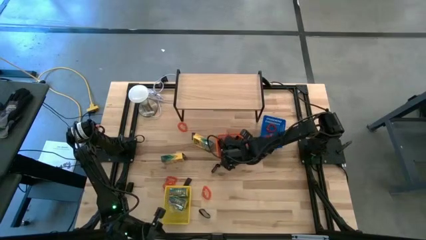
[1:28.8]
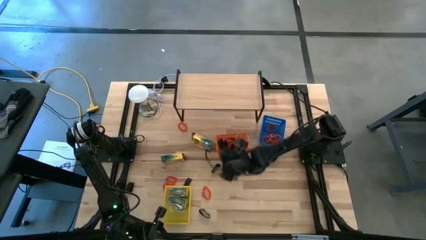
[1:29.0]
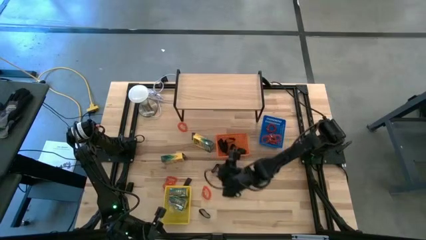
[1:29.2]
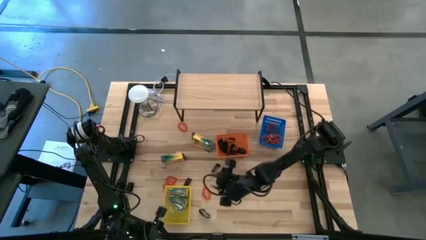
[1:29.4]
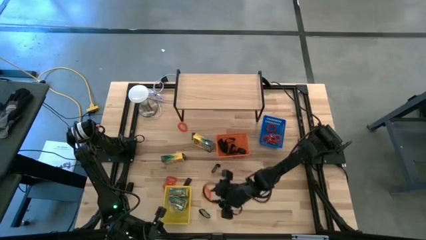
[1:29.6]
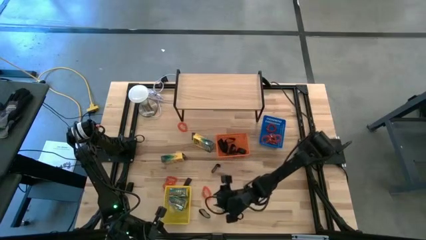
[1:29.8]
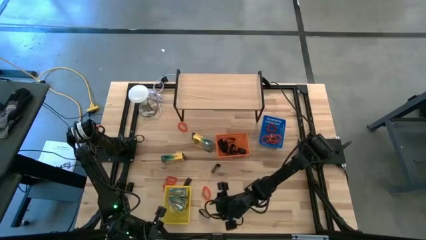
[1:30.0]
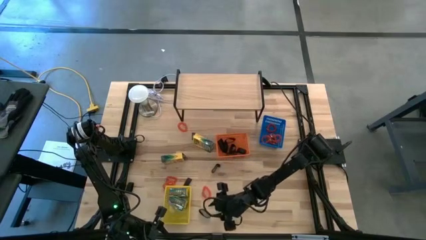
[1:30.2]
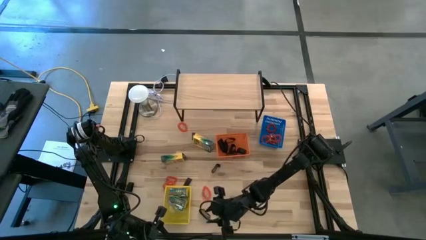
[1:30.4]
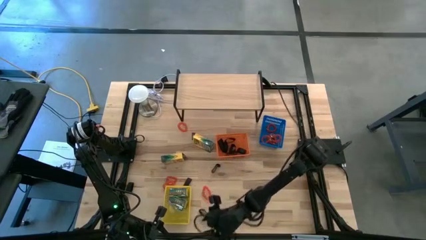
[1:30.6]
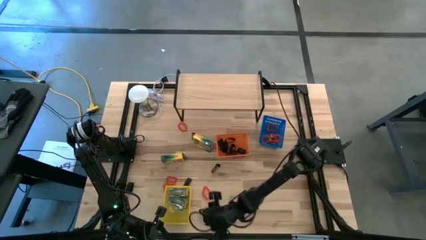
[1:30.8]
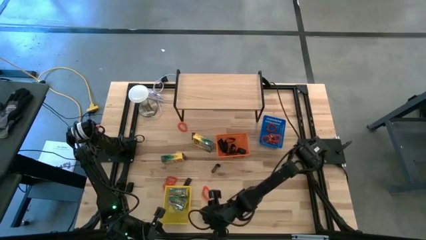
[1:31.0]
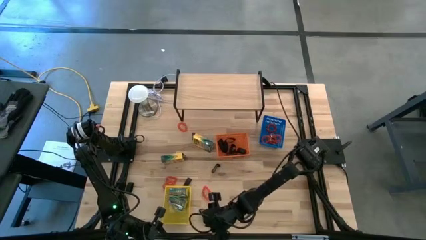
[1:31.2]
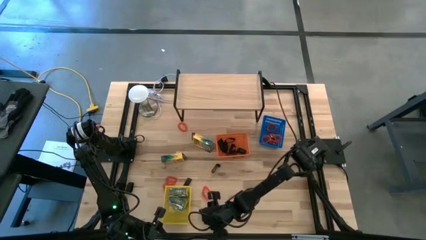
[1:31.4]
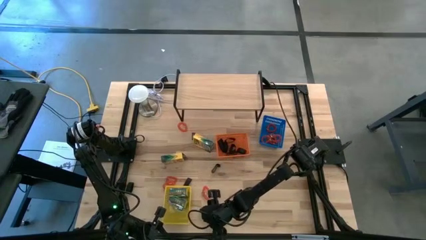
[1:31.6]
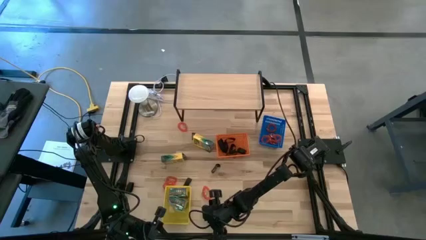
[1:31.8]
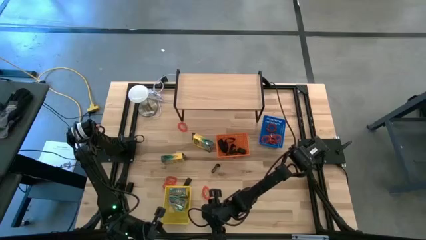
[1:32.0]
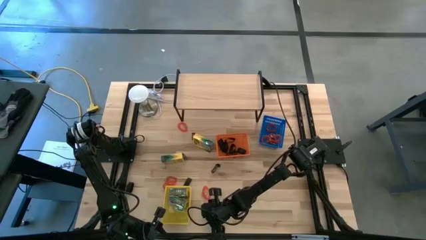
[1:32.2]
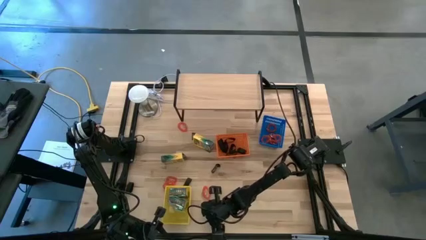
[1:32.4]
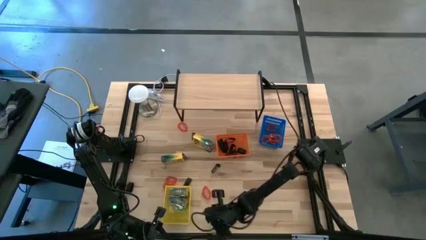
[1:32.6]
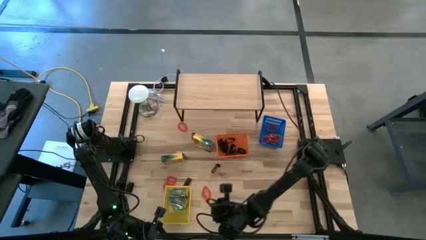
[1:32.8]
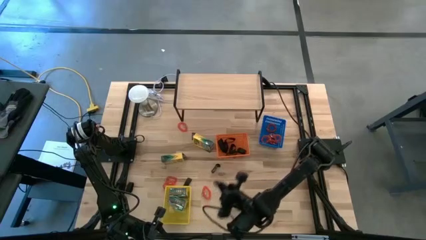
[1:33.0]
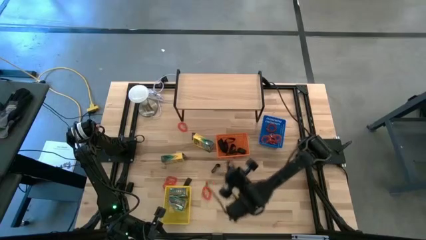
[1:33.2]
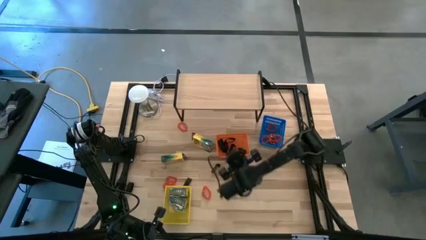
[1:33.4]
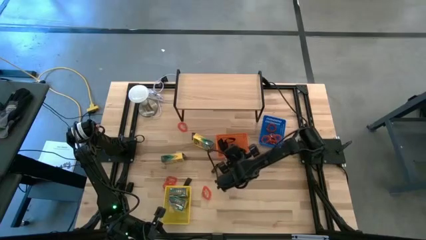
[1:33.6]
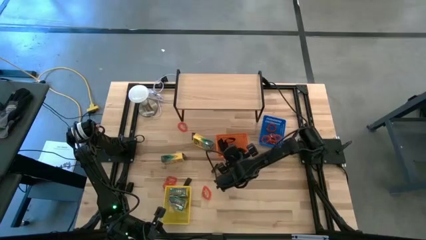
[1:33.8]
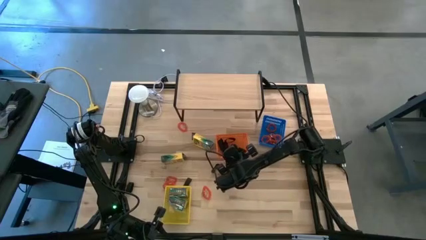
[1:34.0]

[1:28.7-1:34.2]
Task: Pick & Place Office Desk Supplies
Put the rubberband into the orange bin

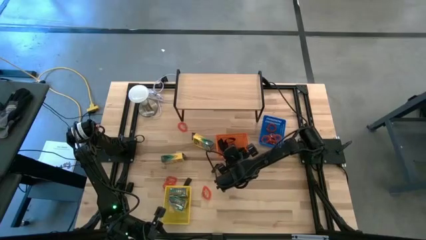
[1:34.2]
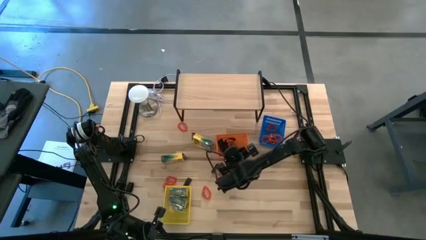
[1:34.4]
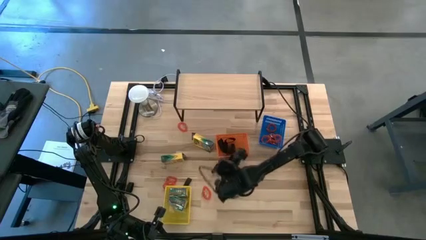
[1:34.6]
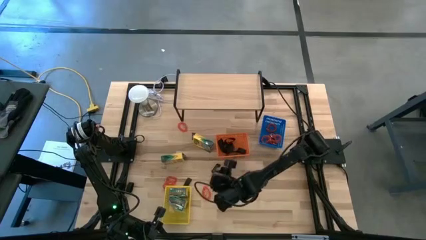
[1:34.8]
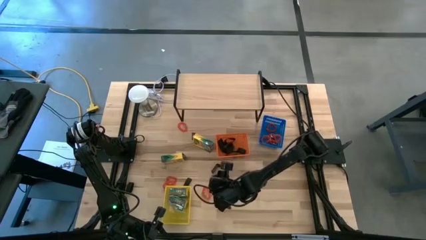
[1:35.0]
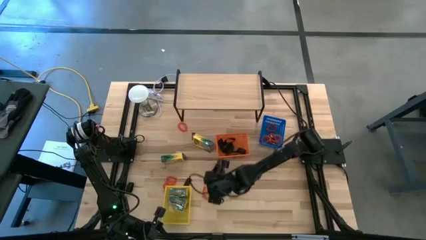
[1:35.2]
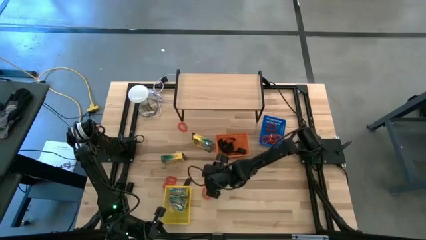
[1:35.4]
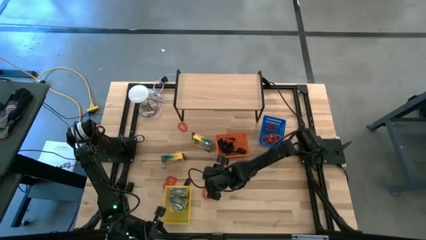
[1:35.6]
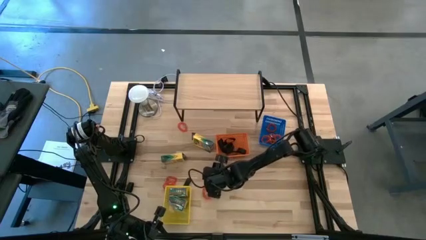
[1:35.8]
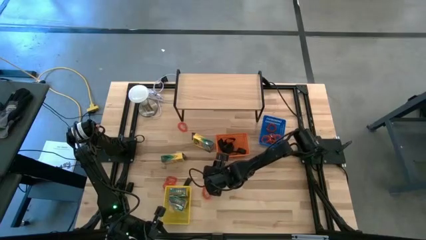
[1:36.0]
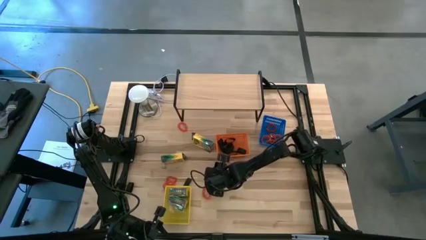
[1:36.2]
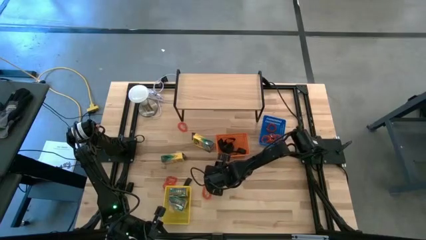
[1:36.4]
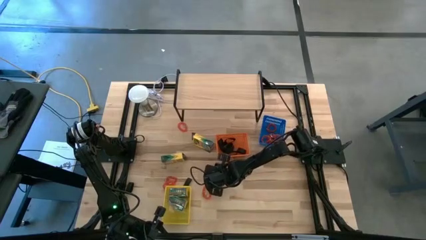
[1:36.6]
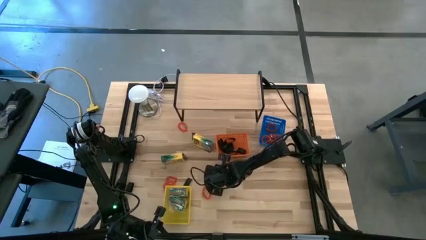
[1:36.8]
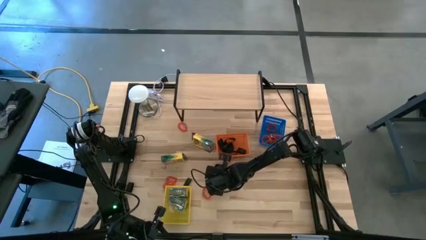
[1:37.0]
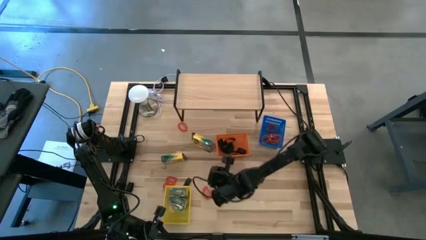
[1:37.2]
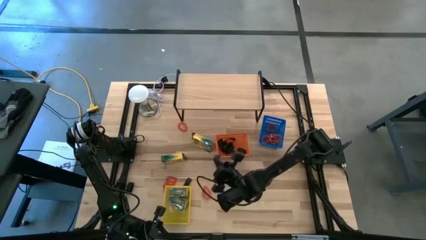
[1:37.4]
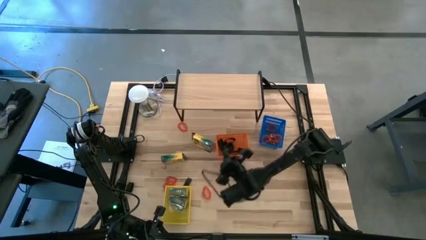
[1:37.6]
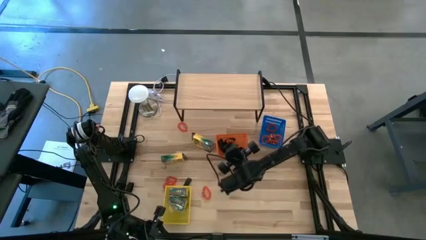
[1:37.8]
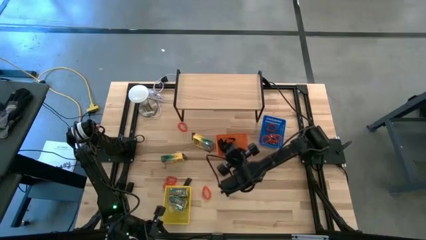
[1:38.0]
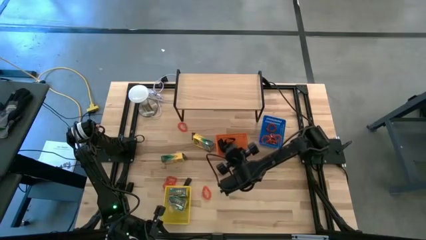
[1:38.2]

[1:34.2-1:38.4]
Put the rubberband into the orange bin
